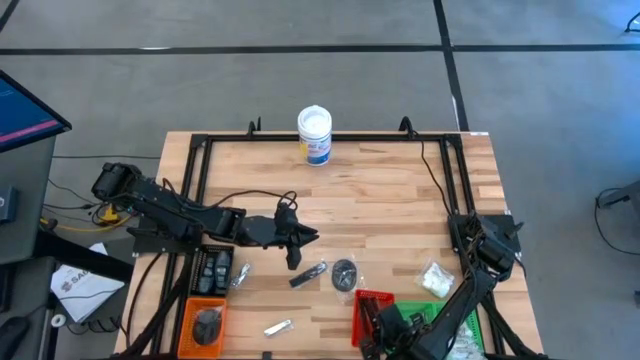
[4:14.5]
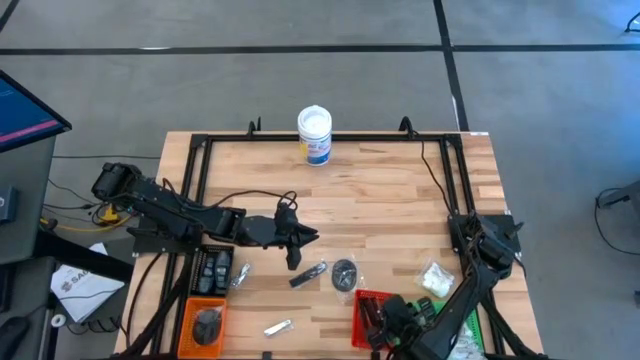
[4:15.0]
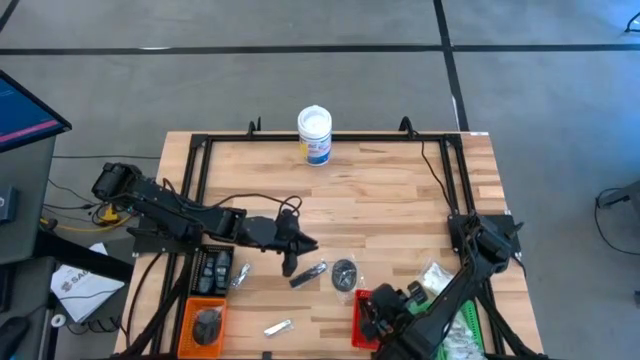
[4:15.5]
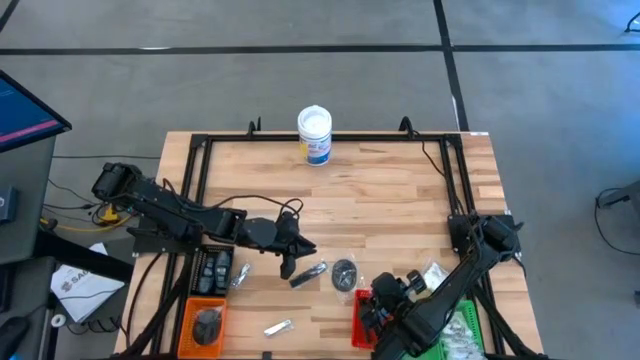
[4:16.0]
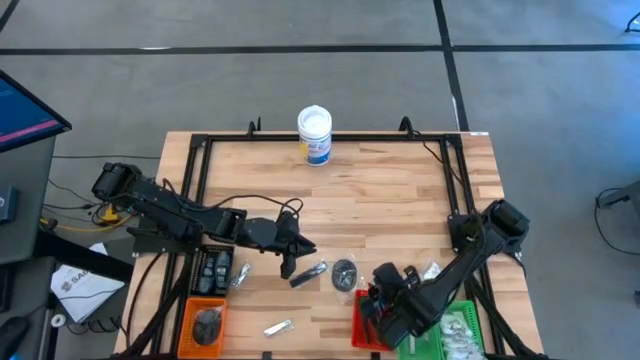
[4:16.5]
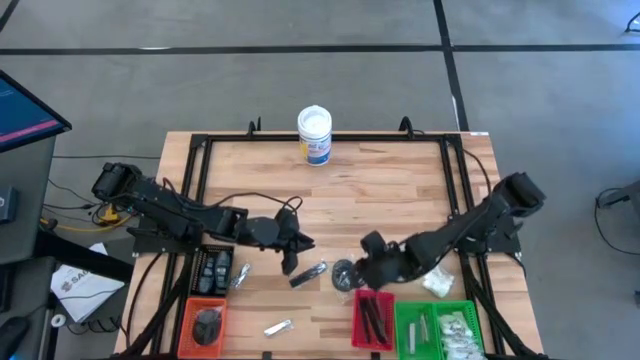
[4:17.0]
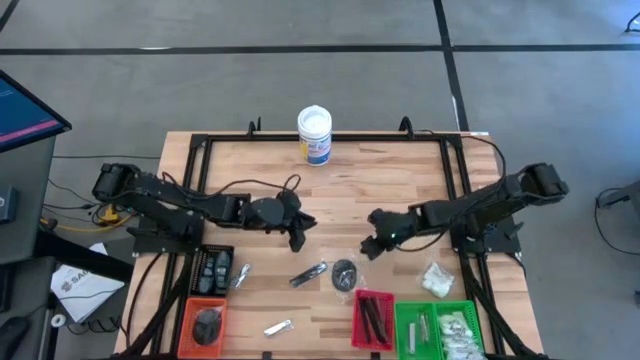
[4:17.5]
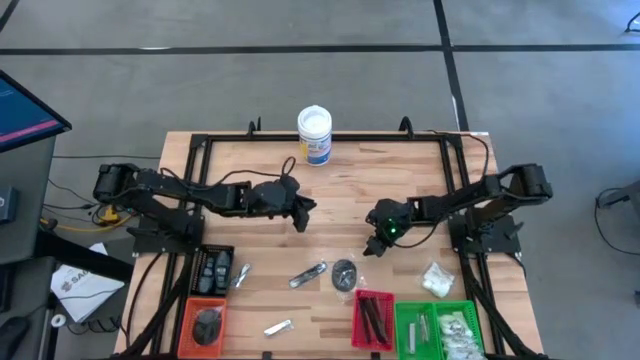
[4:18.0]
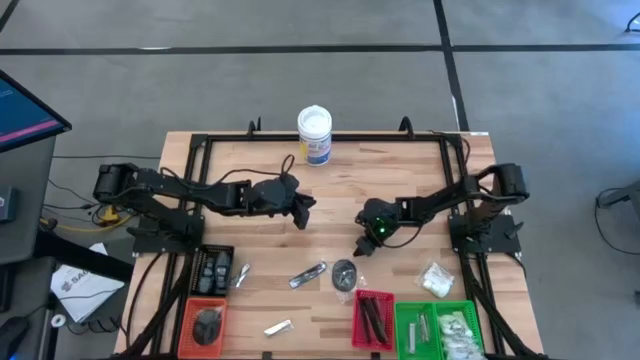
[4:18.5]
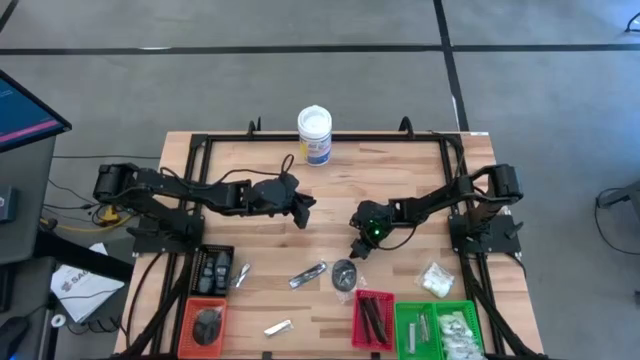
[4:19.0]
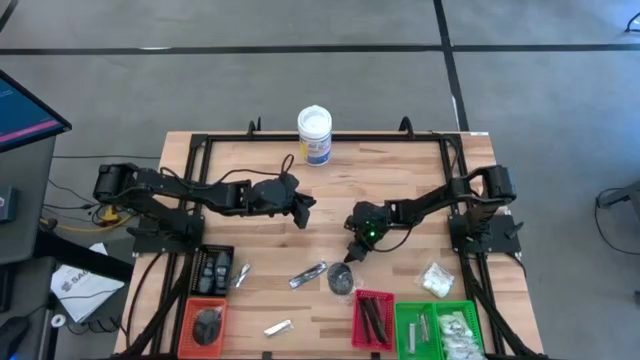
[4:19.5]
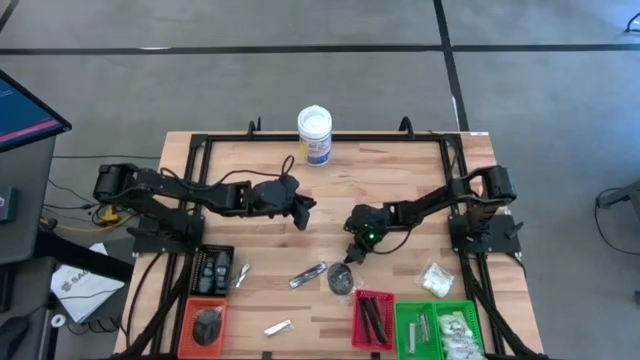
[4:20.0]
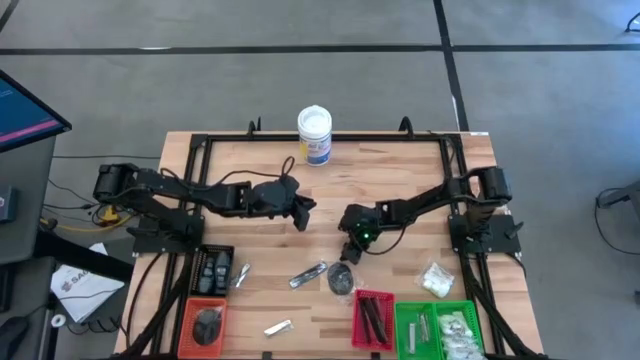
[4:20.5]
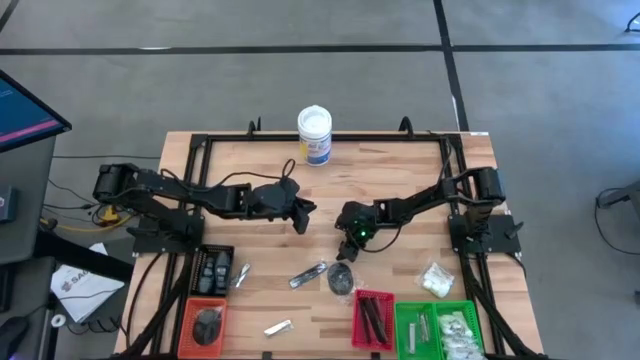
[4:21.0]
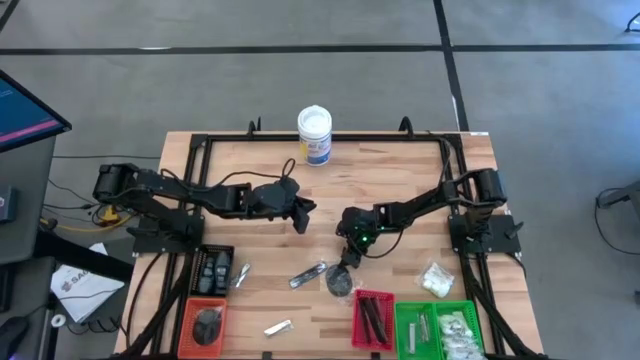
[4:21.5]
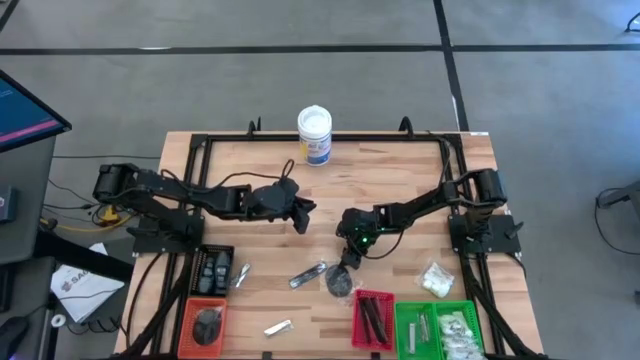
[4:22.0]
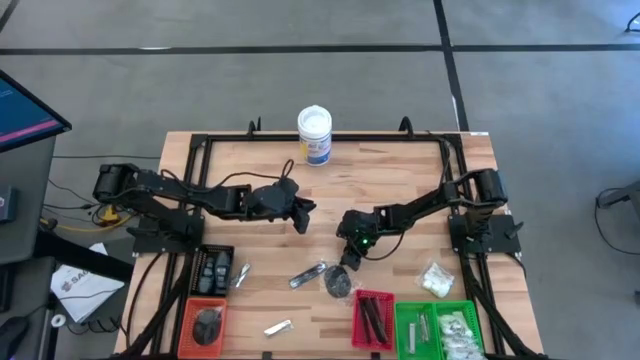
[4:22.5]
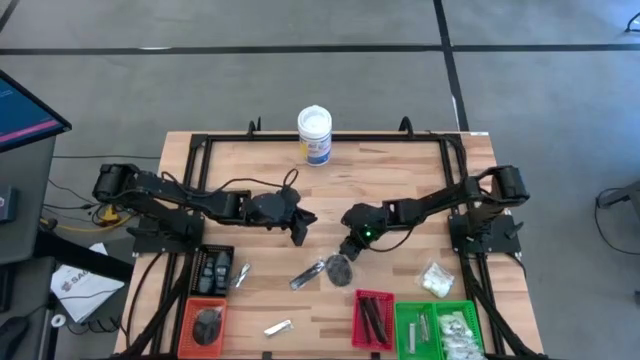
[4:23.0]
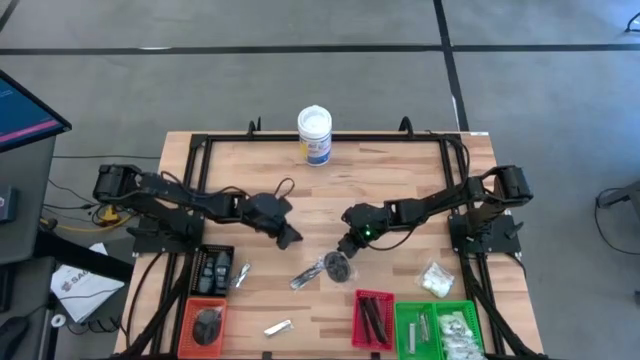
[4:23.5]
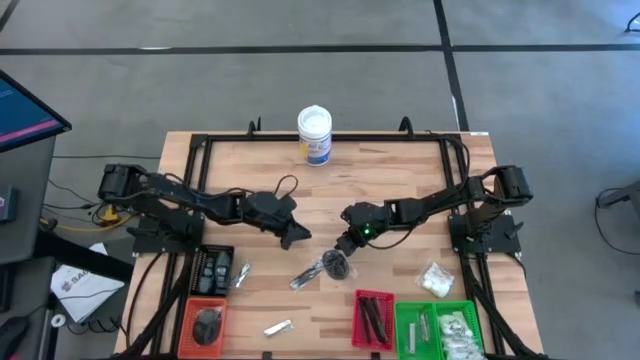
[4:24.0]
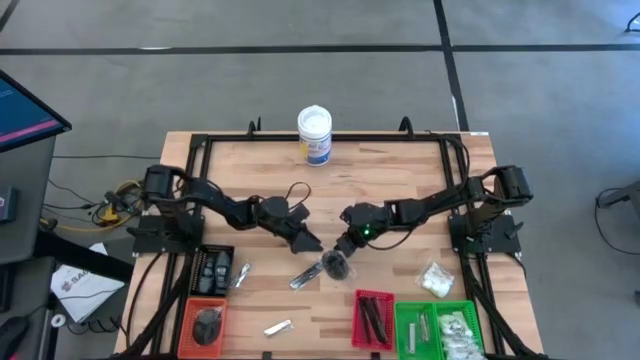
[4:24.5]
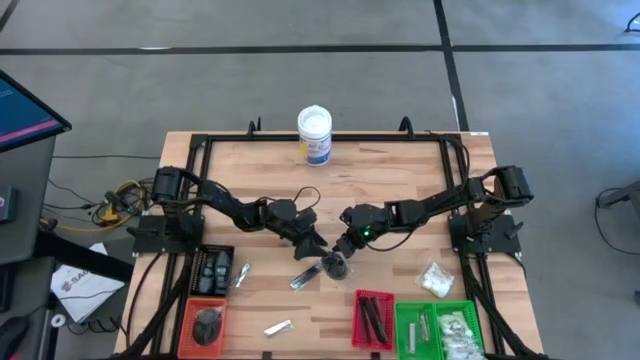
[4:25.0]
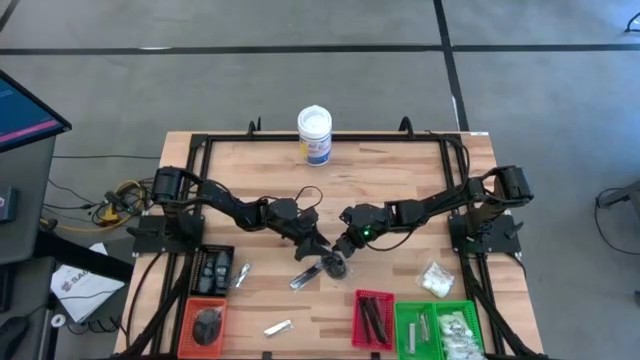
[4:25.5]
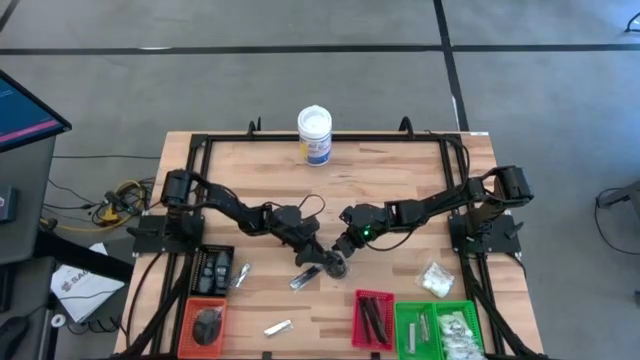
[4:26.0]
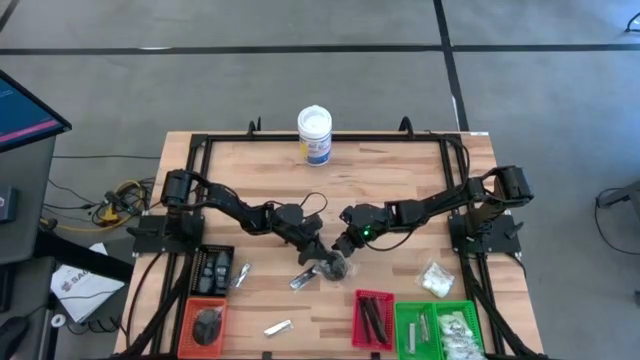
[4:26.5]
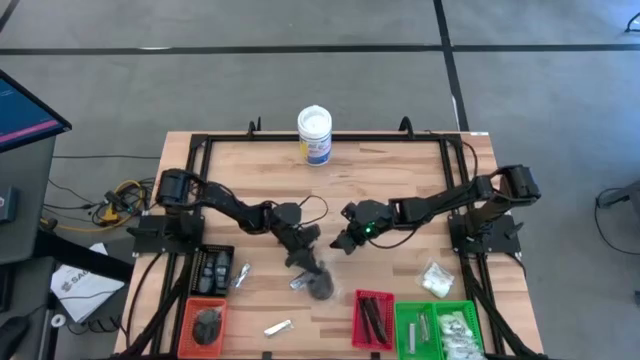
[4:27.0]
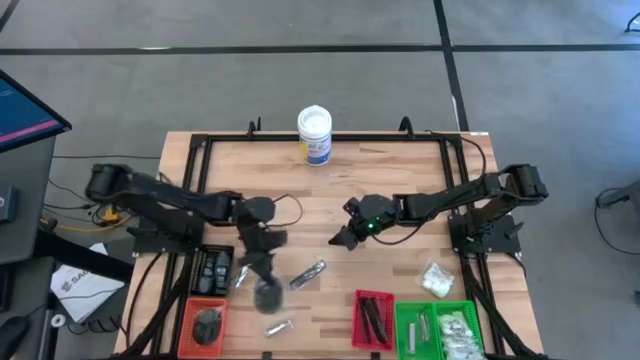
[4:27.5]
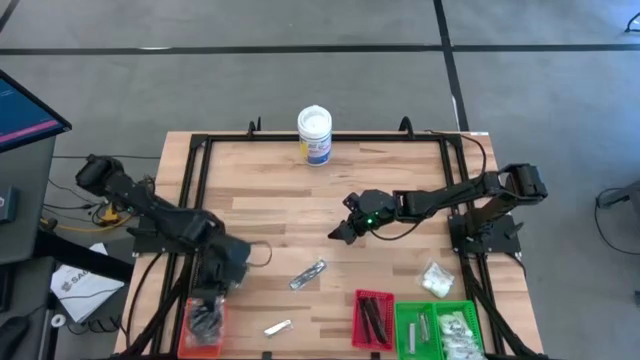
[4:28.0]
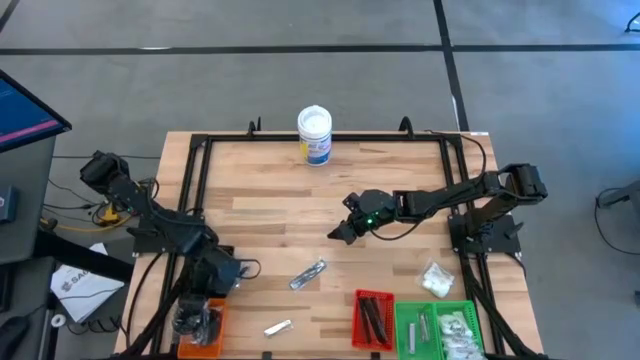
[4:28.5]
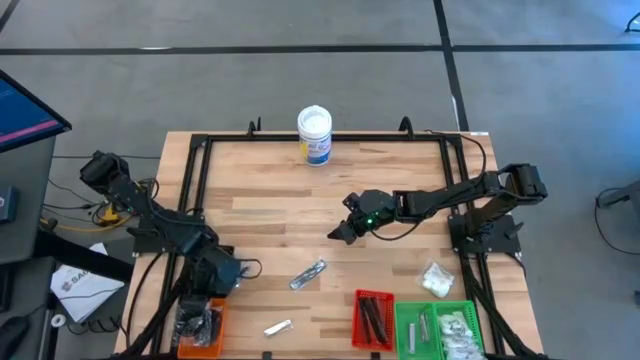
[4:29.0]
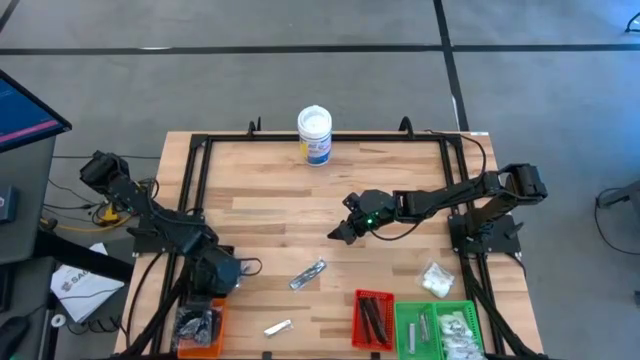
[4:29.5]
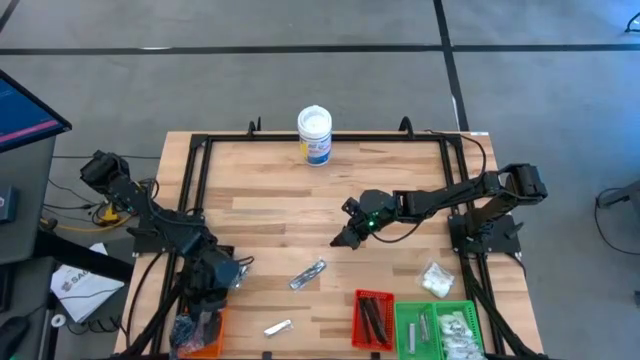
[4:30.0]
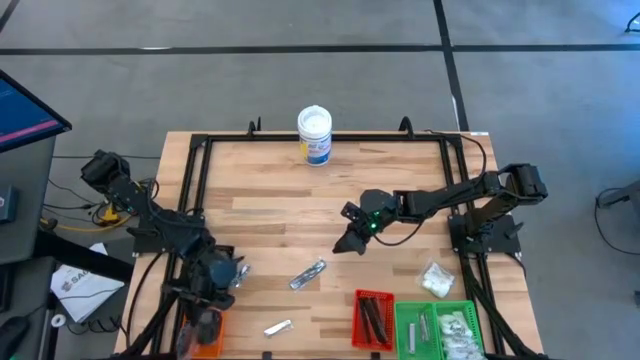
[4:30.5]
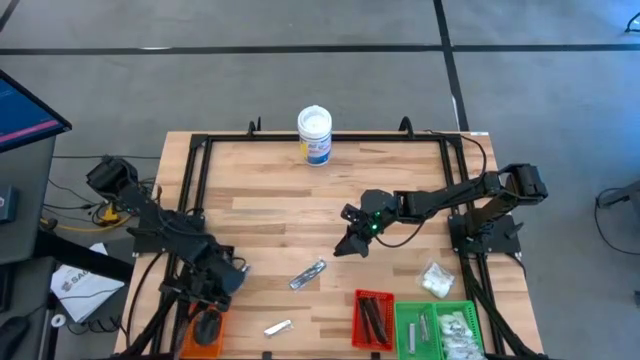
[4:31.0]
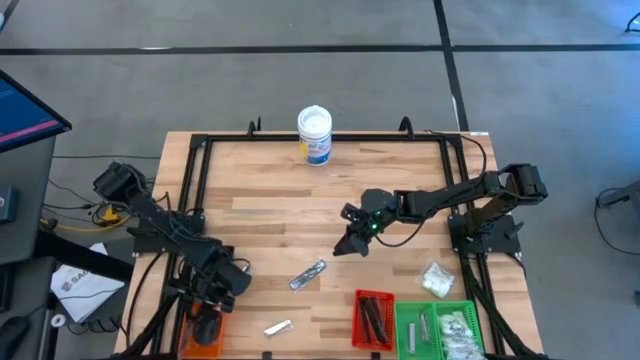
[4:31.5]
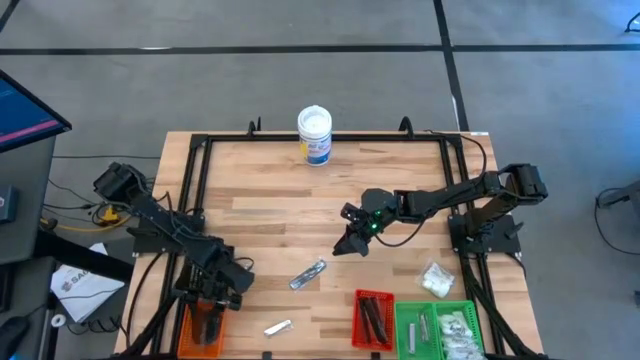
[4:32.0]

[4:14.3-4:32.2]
Task: Pick & Place Travel size toiletries
Put the black hairbrush into the orange bin

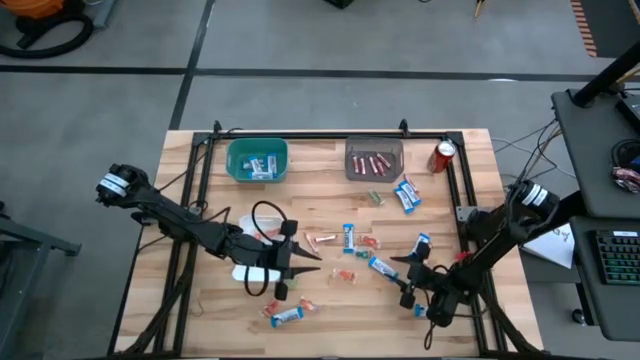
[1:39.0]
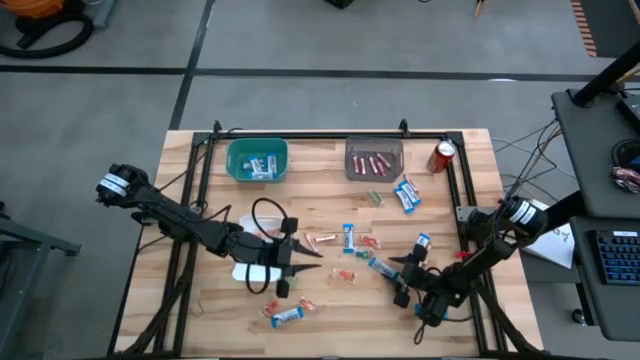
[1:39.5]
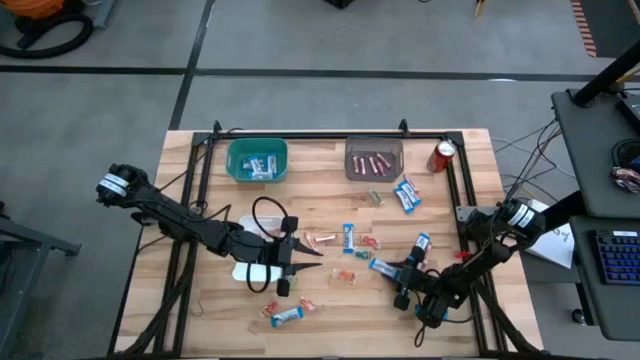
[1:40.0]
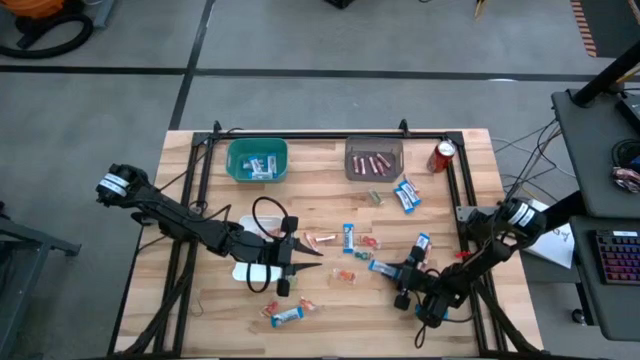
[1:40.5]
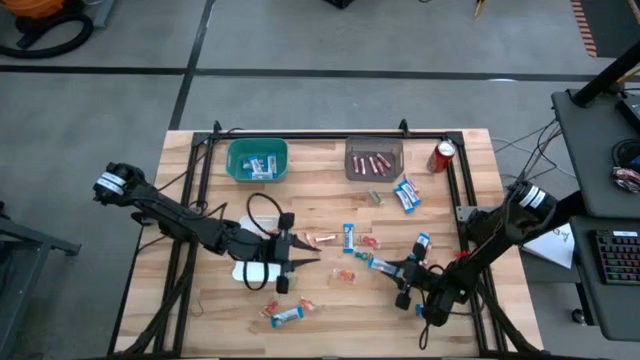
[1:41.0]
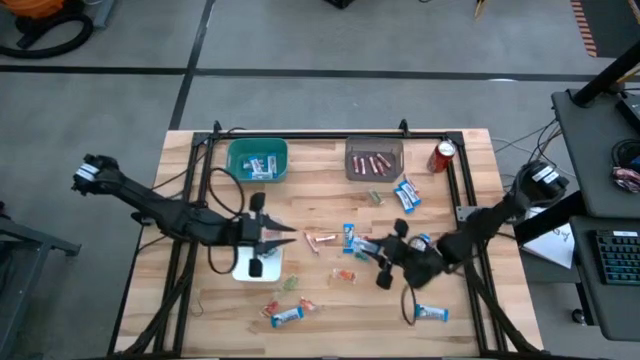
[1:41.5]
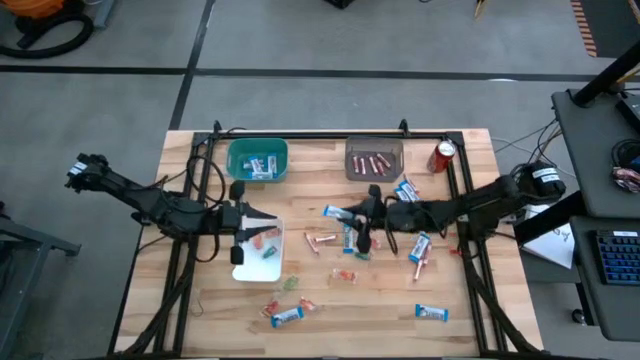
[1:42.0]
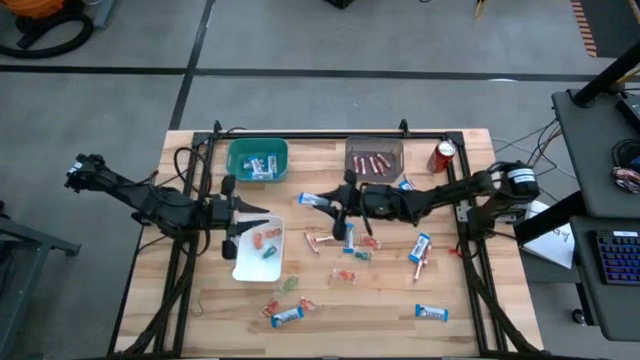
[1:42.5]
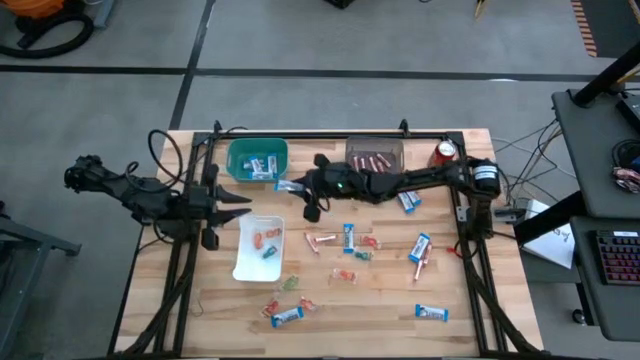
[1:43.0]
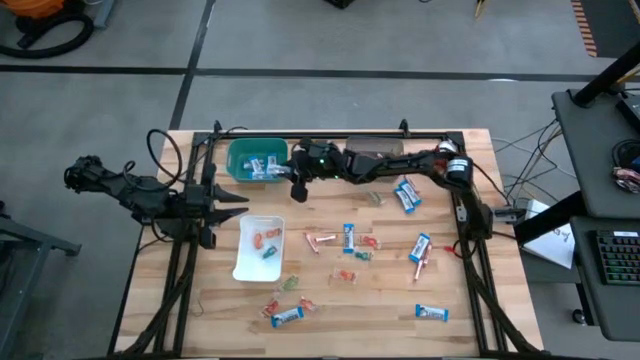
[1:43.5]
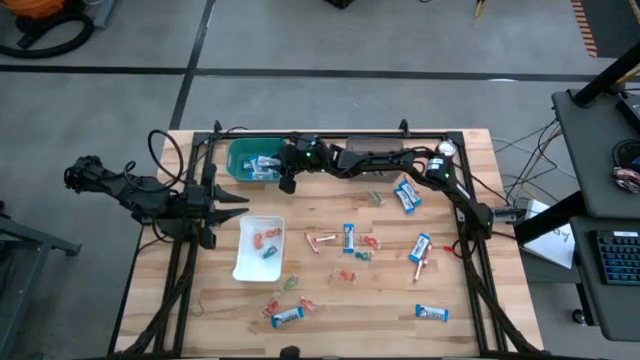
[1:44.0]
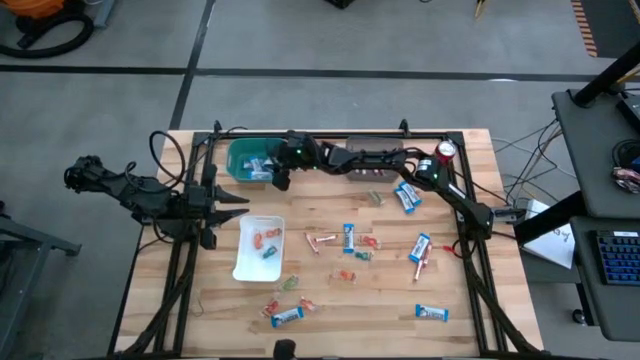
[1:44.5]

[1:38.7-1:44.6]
Task: Sort candy
Put the white chocolate bar into the green bin
